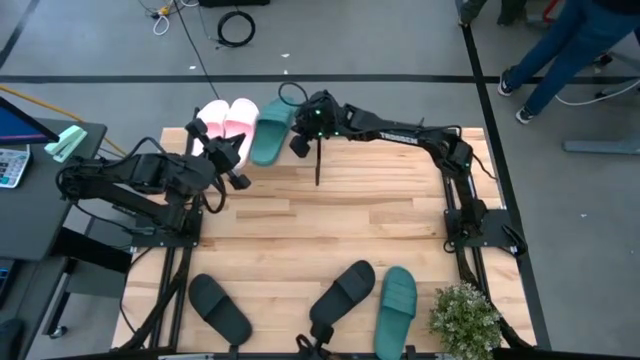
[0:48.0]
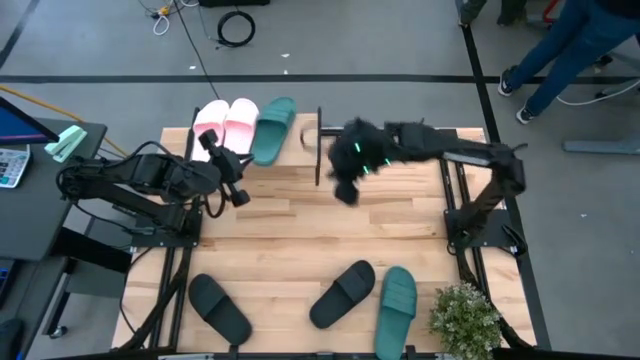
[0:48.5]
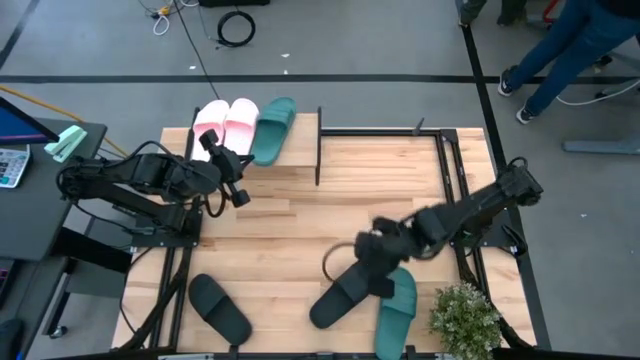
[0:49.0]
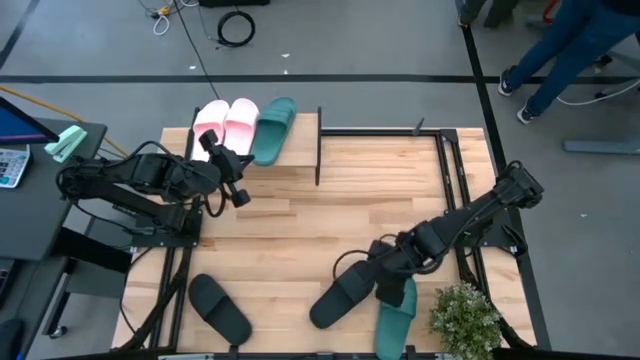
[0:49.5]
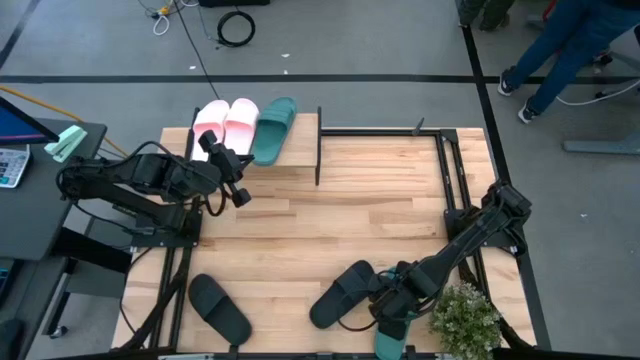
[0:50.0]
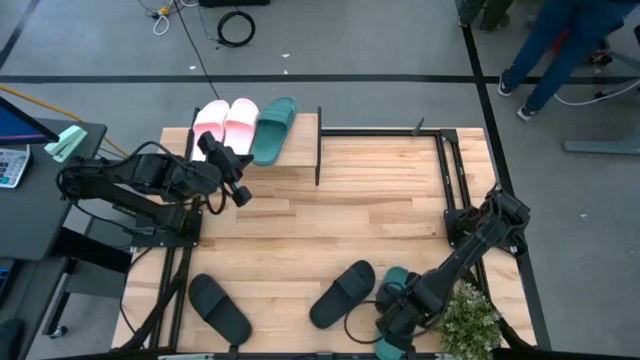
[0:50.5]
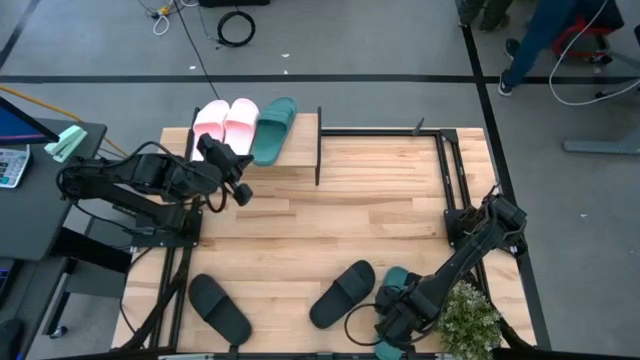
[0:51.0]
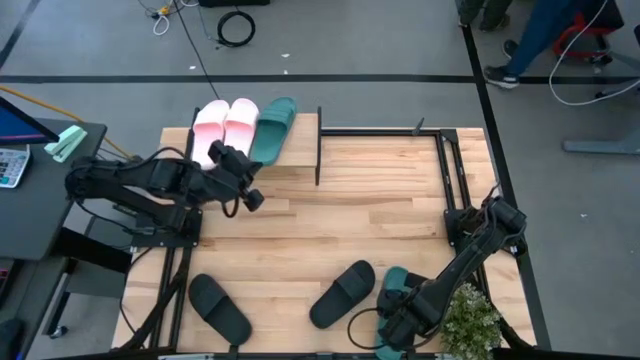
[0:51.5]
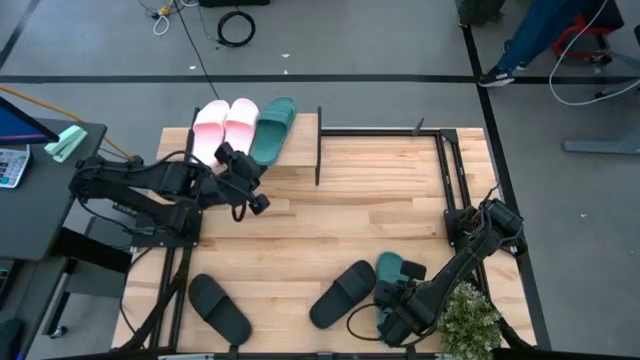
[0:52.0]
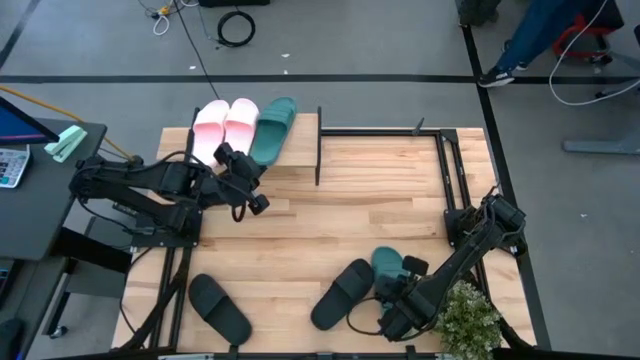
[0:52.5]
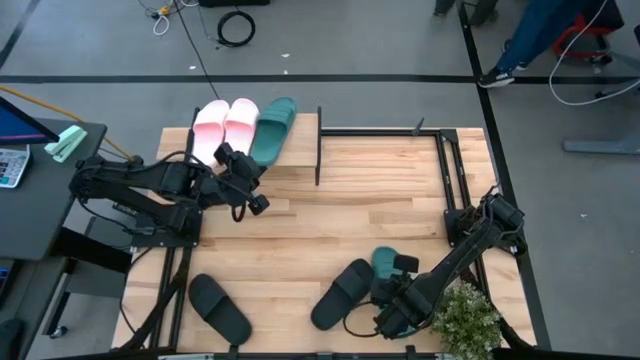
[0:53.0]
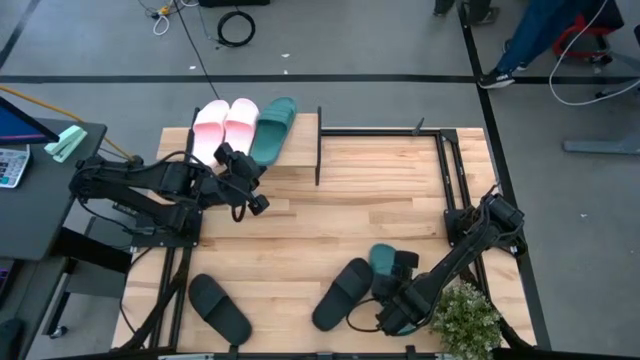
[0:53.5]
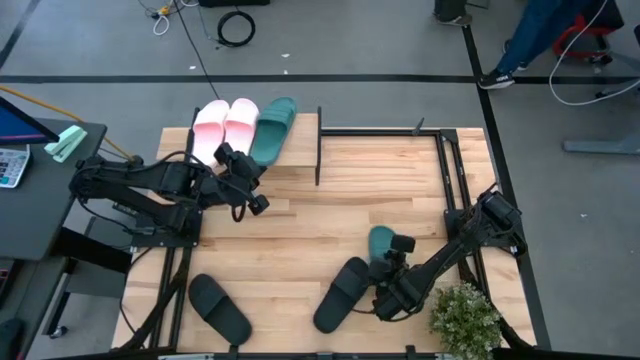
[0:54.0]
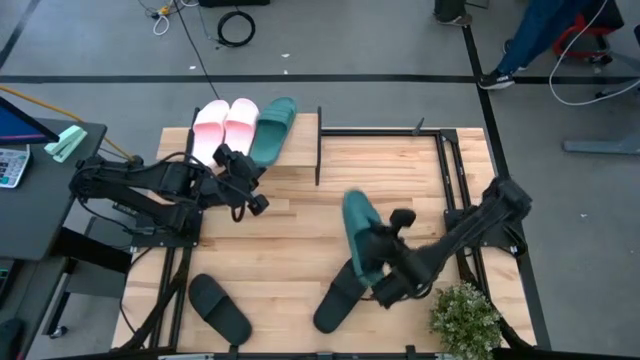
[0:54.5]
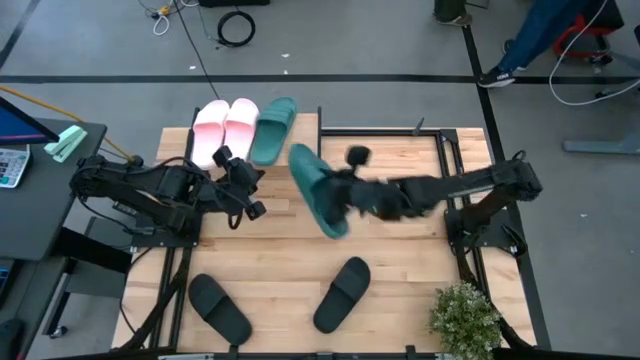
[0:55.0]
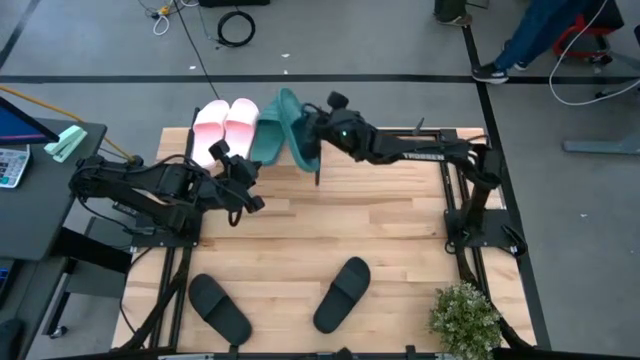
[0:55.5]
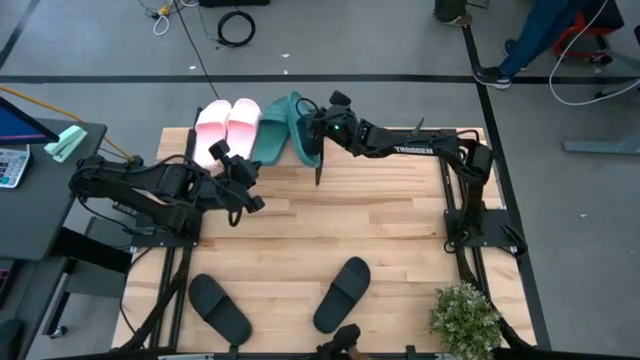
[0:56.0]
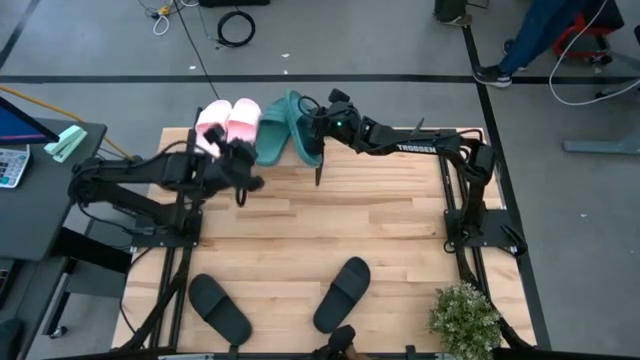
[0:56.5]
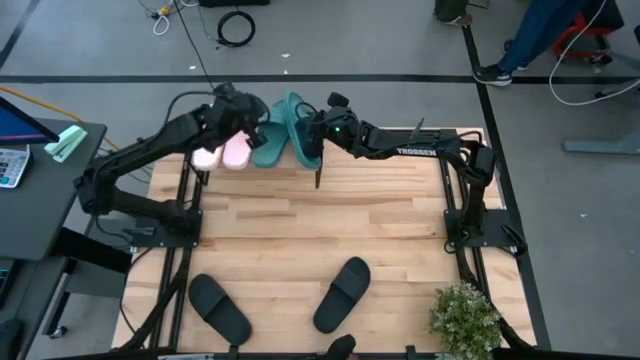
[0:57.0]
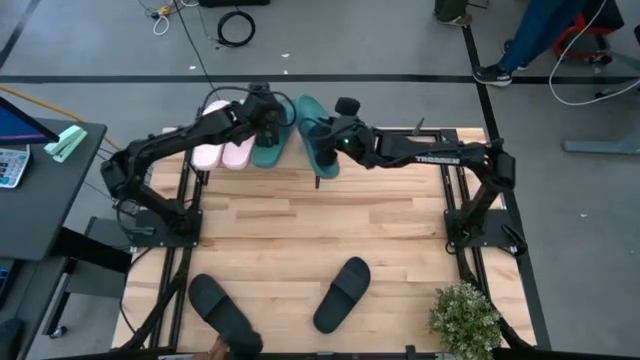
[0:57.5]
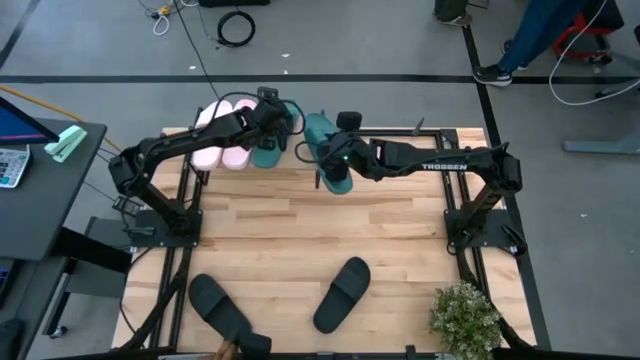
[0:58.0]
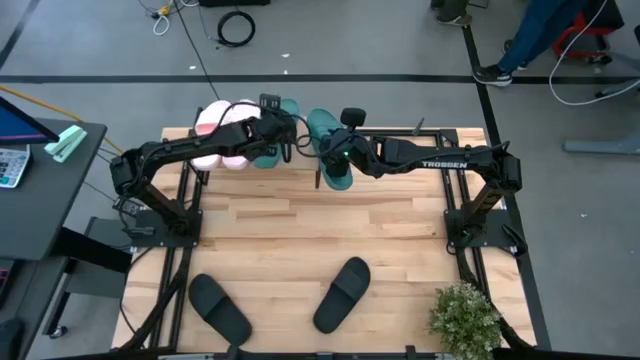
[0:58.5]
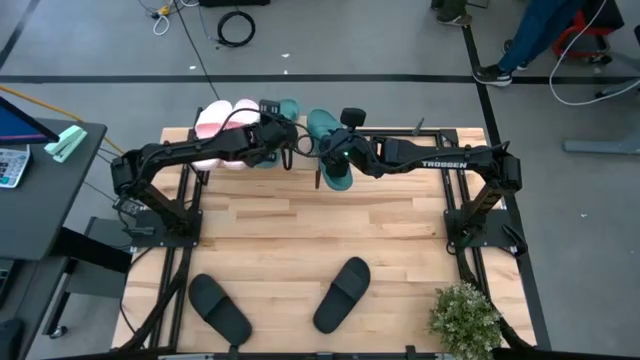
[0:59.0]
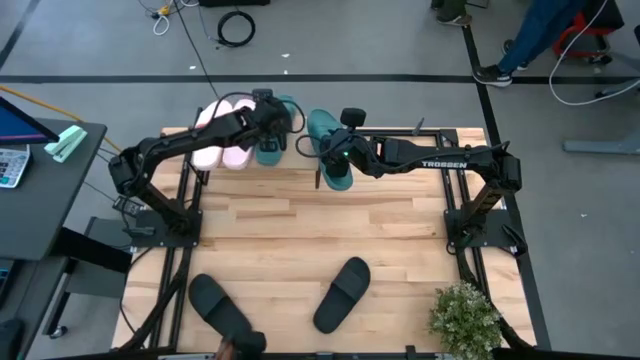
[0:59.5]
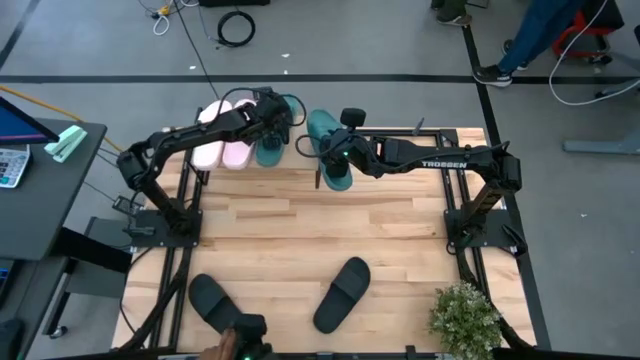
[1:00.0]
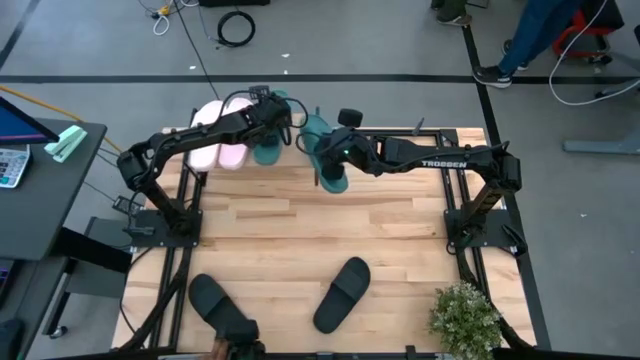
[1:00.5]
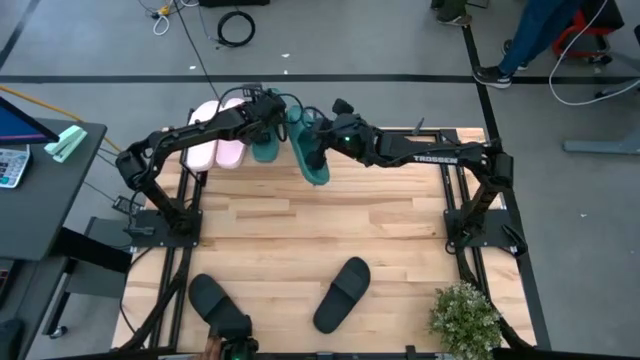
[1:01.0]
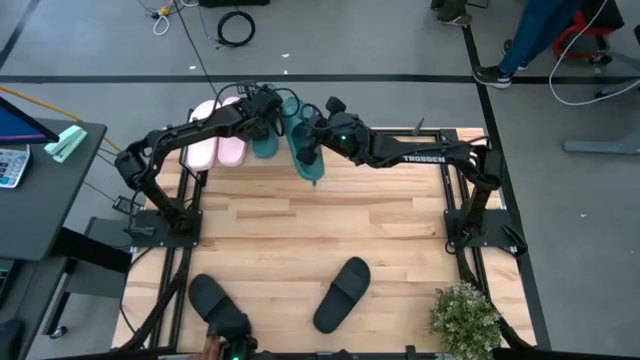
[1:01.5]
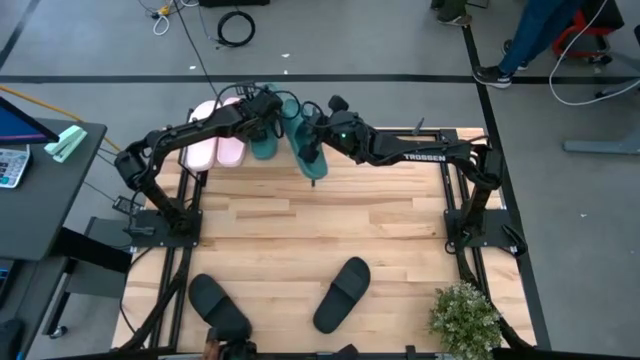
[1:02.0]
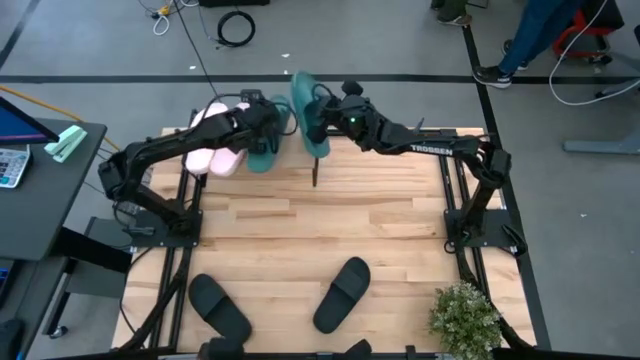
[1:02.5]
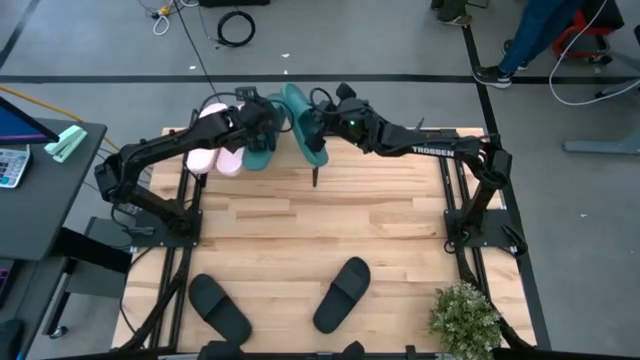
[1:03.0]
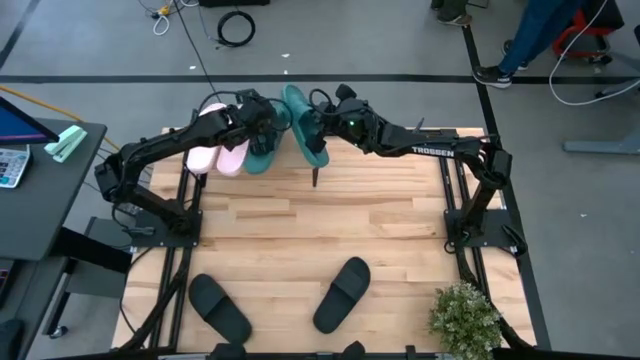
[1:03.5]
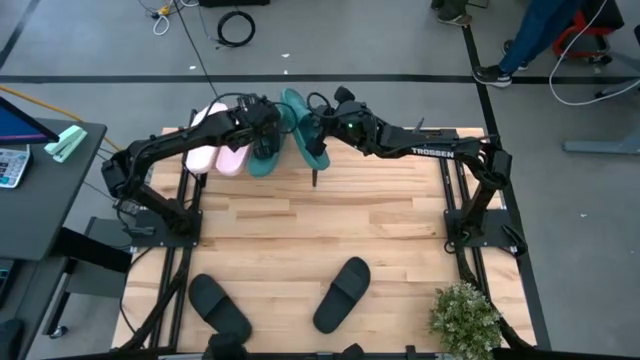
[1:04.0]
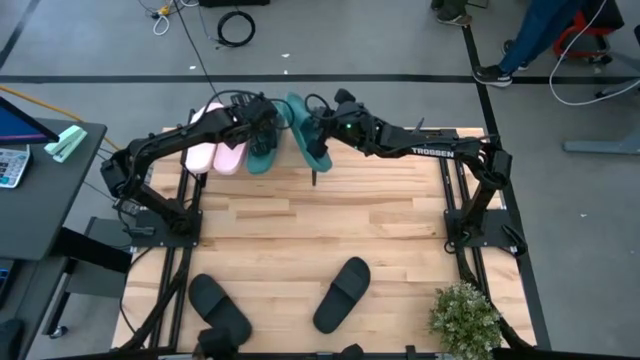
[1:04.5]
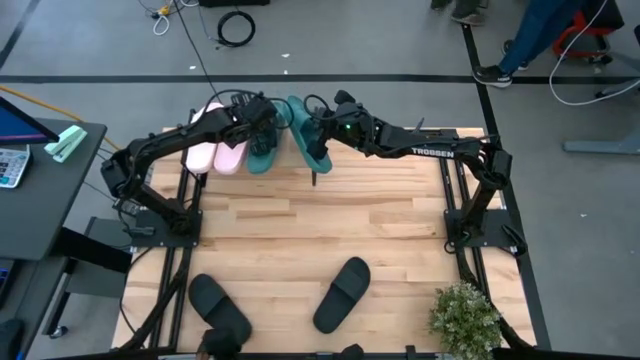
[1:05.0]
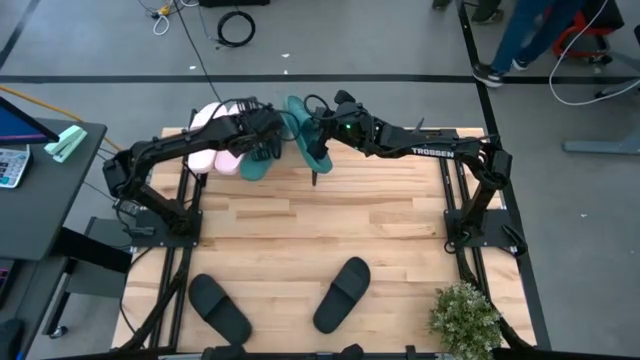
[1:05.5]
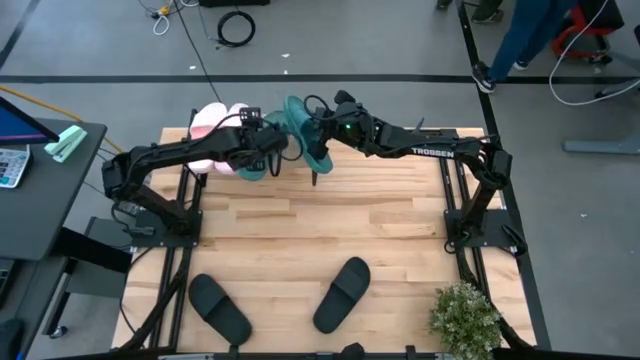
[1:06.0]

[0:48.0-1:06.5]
Task: Pick and place slides into the shelf
Put the green slide on the shelf

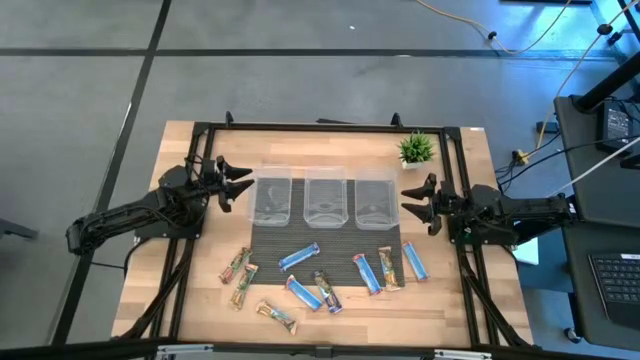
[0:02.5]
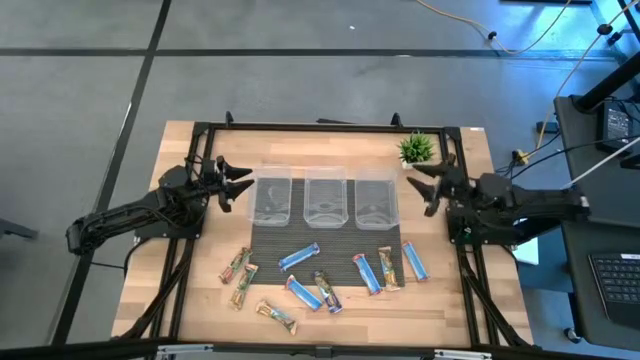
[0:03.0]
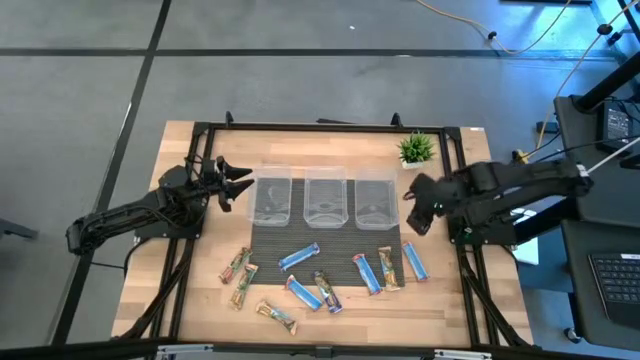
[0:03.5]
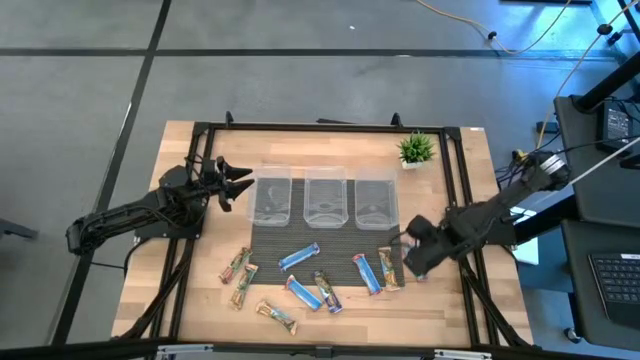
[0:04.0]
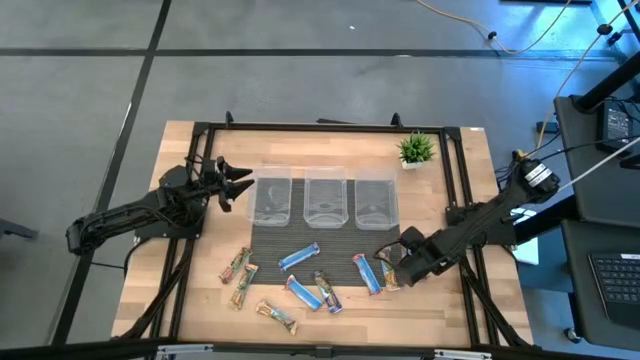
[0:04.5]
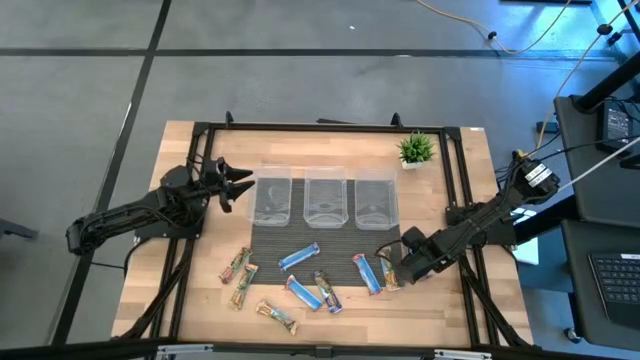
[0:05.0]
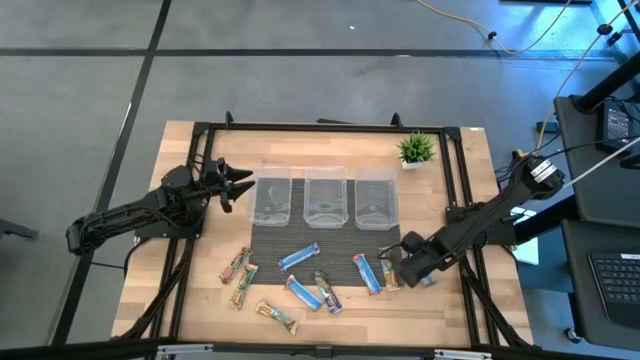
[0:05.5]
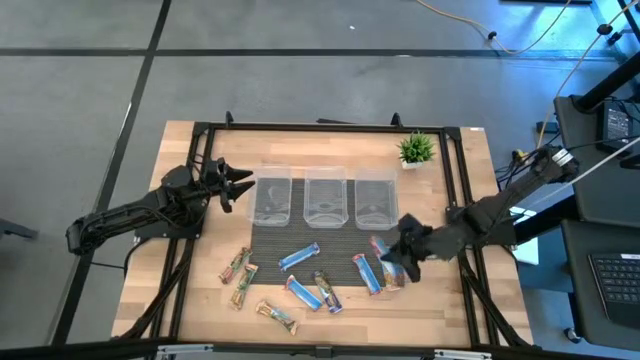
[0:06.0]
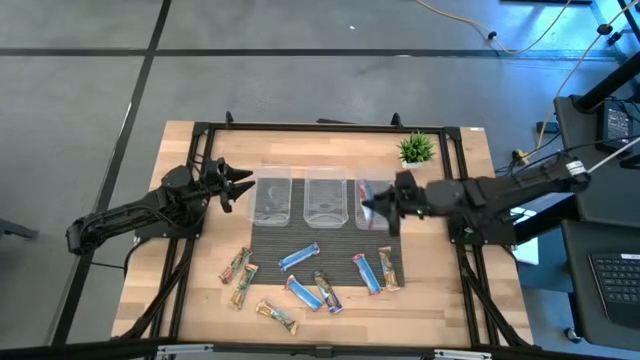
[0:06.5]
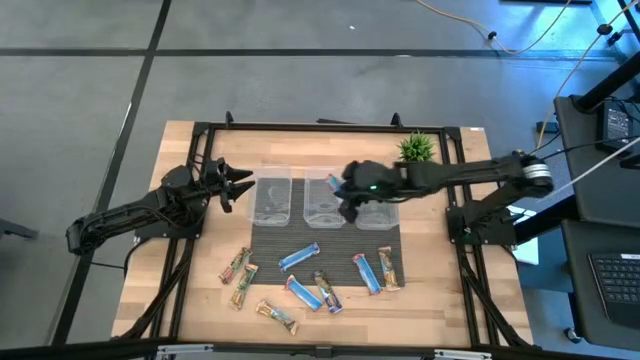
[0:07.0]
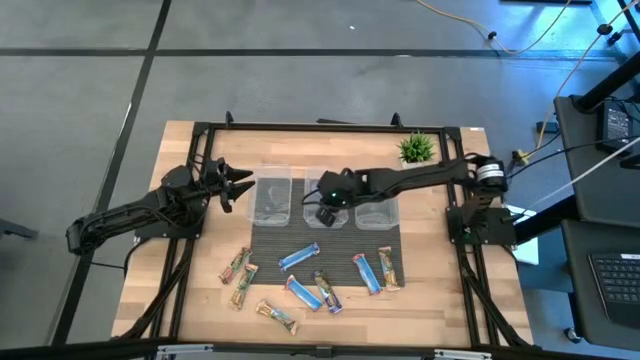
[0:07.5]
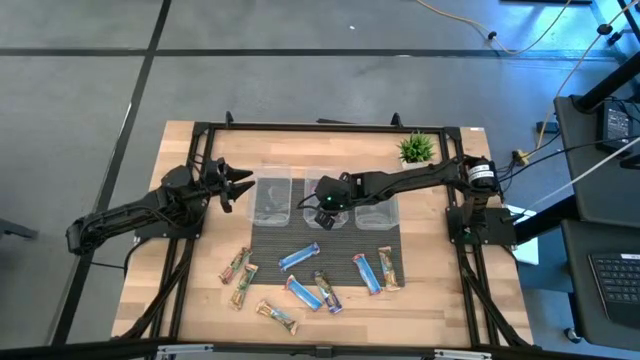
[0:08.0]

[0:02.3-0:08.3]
Task: Pick and place Granola Bars by type
Put the red granola bar into the middle transparent bin
